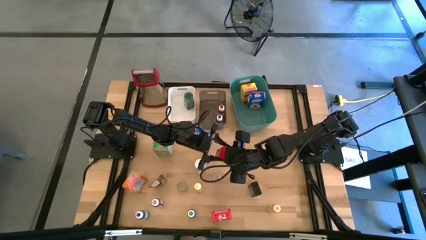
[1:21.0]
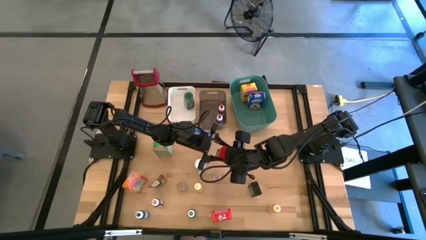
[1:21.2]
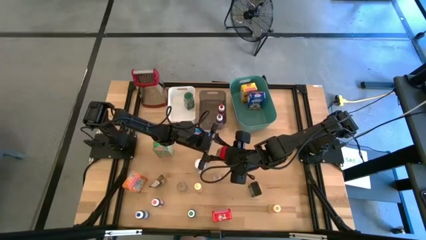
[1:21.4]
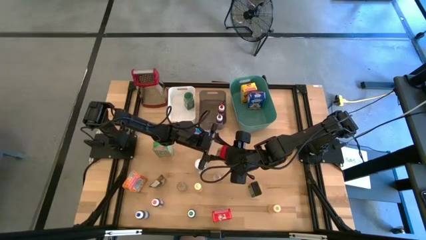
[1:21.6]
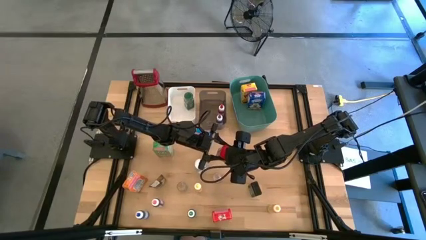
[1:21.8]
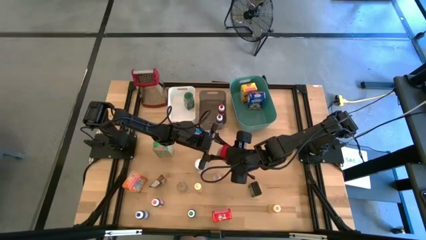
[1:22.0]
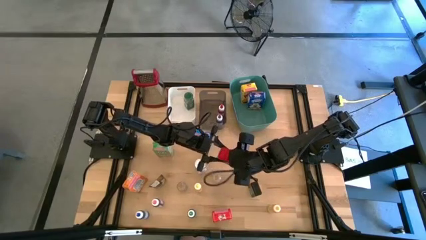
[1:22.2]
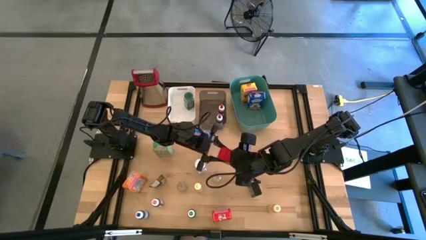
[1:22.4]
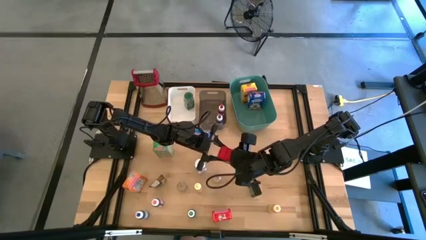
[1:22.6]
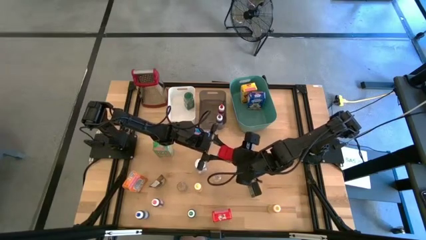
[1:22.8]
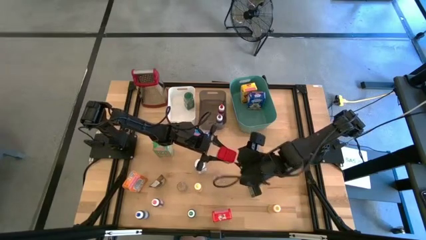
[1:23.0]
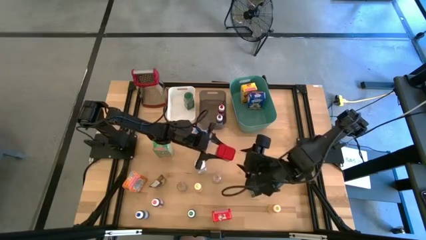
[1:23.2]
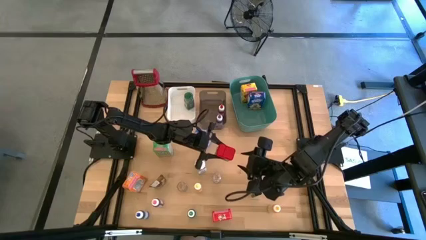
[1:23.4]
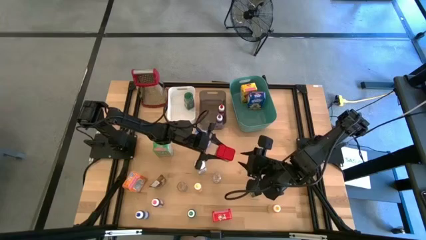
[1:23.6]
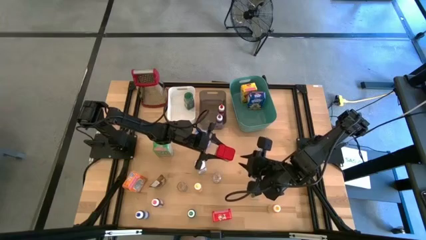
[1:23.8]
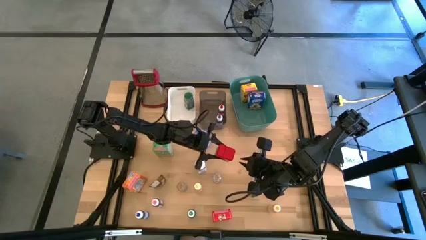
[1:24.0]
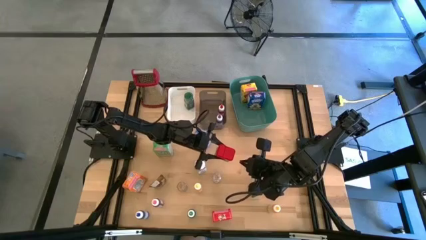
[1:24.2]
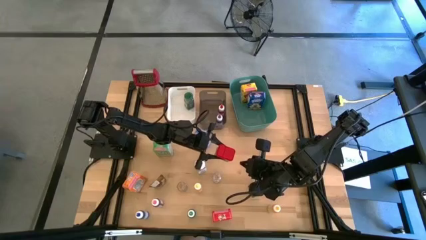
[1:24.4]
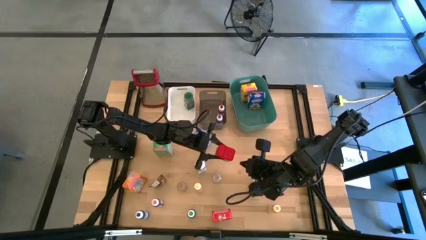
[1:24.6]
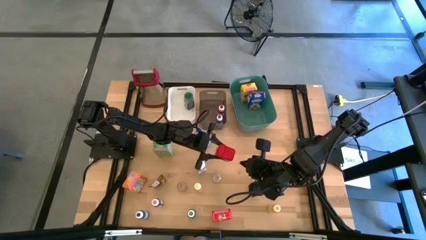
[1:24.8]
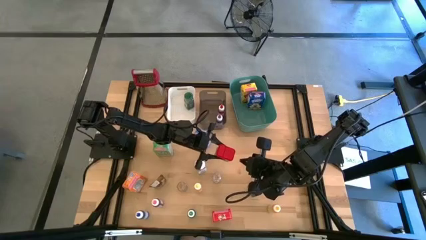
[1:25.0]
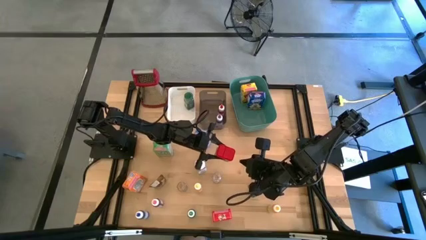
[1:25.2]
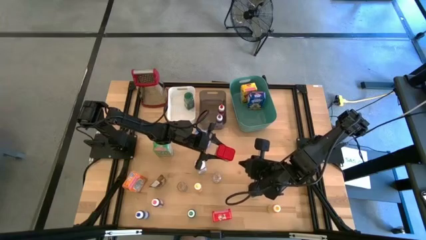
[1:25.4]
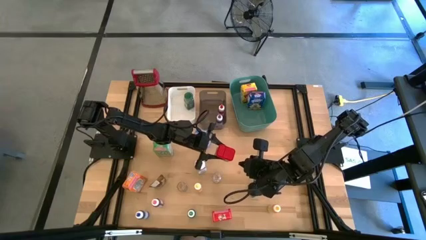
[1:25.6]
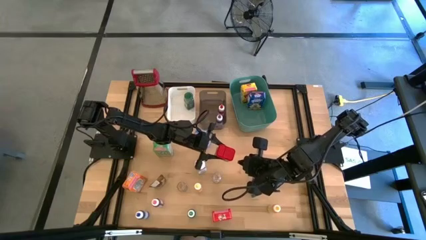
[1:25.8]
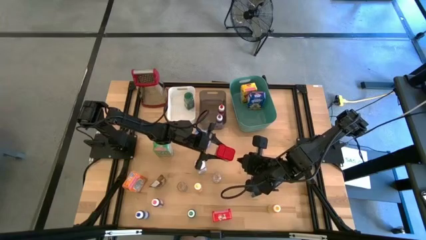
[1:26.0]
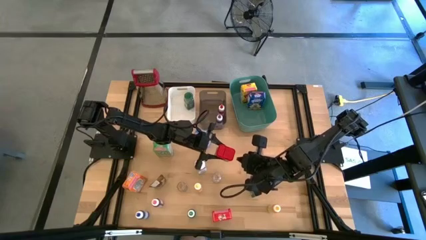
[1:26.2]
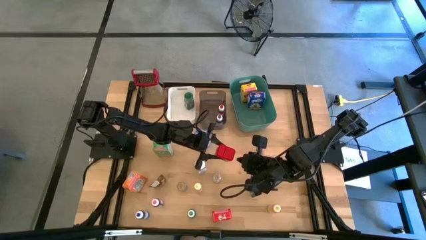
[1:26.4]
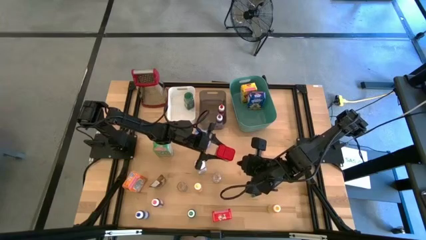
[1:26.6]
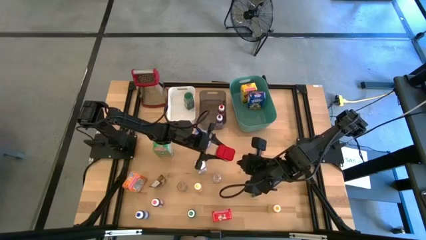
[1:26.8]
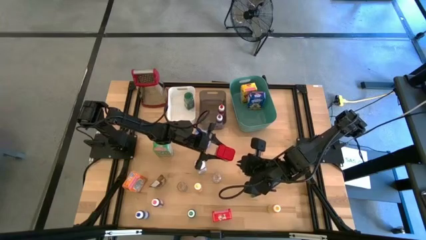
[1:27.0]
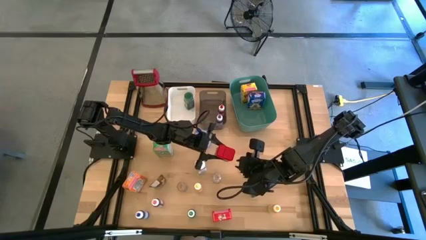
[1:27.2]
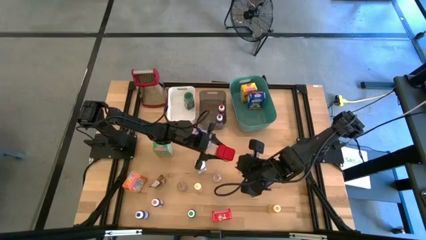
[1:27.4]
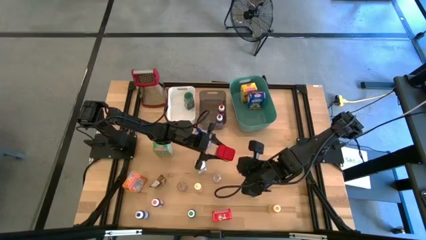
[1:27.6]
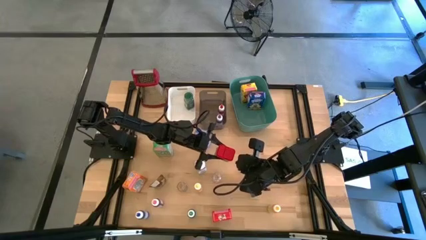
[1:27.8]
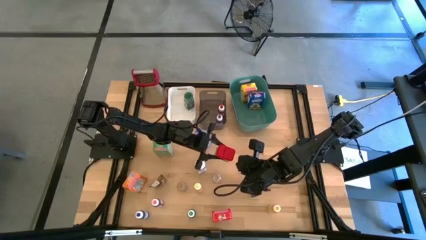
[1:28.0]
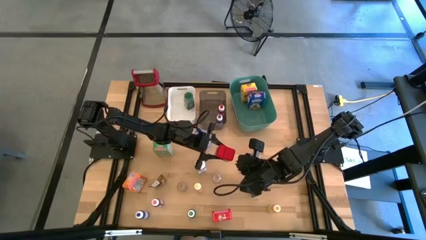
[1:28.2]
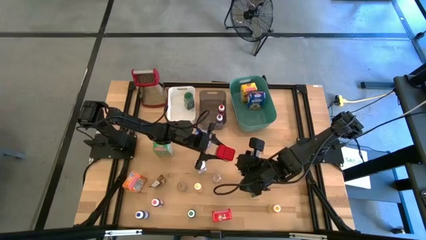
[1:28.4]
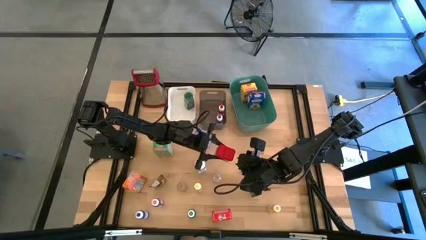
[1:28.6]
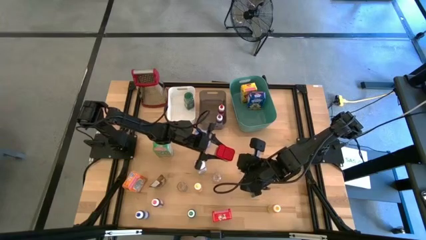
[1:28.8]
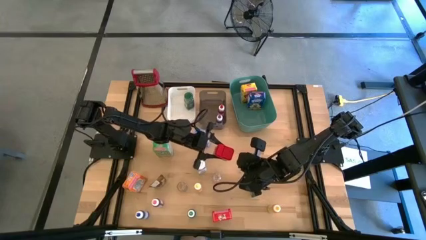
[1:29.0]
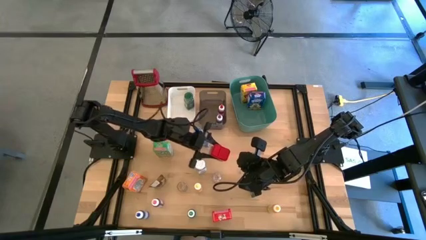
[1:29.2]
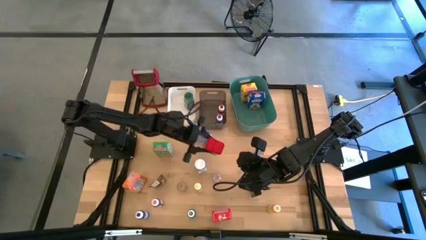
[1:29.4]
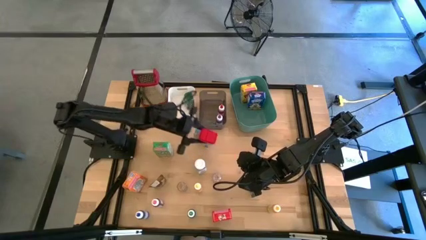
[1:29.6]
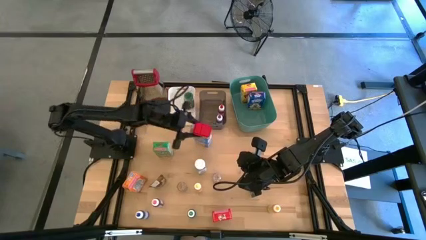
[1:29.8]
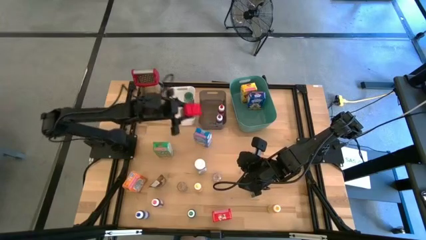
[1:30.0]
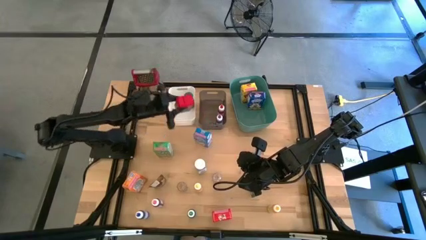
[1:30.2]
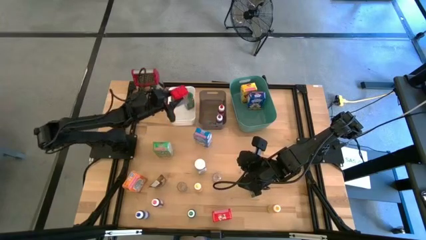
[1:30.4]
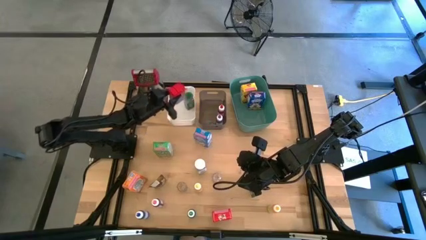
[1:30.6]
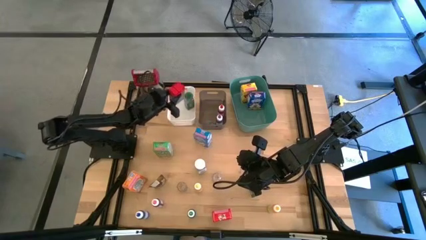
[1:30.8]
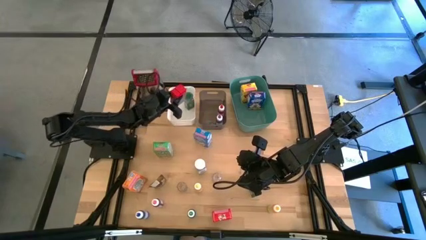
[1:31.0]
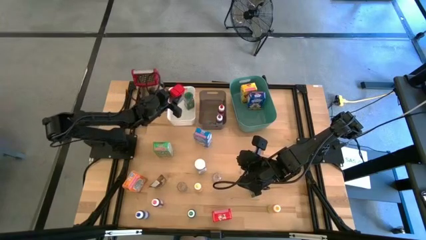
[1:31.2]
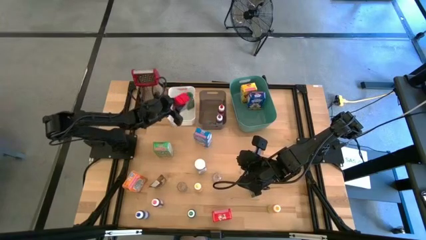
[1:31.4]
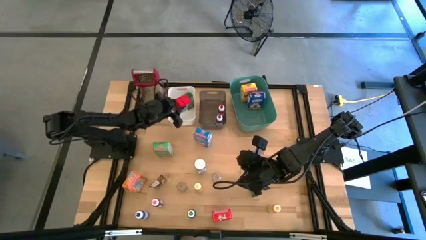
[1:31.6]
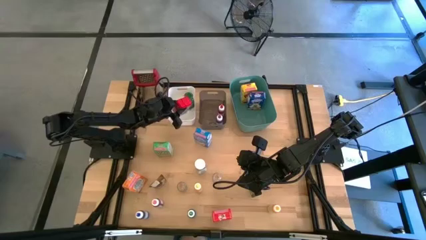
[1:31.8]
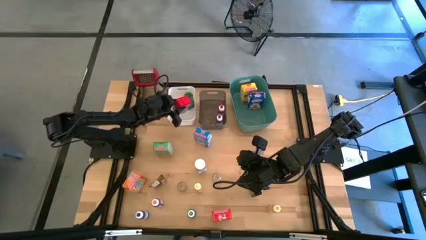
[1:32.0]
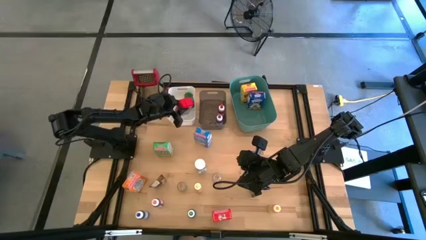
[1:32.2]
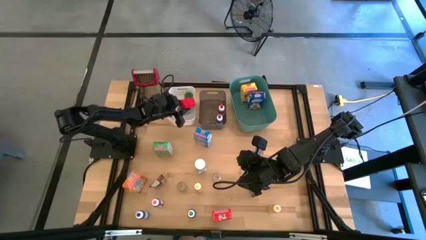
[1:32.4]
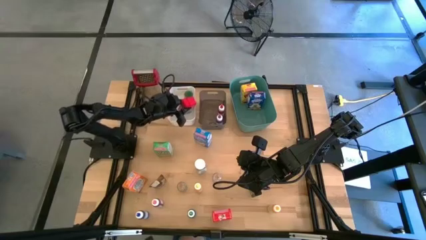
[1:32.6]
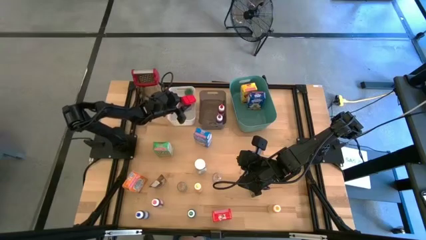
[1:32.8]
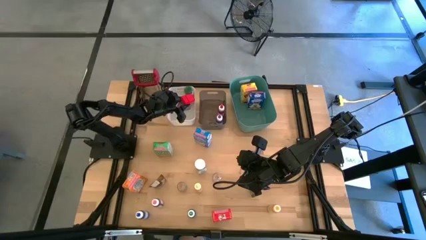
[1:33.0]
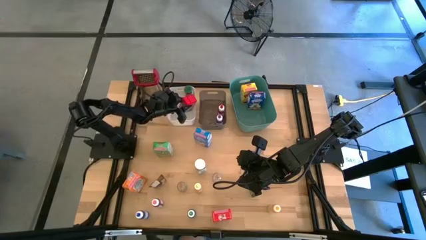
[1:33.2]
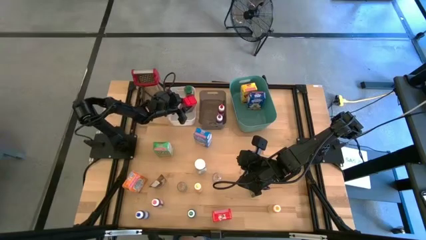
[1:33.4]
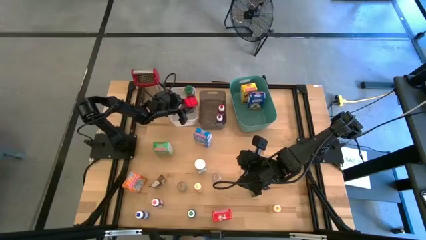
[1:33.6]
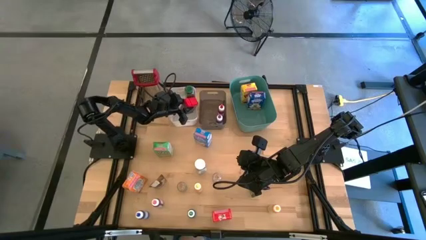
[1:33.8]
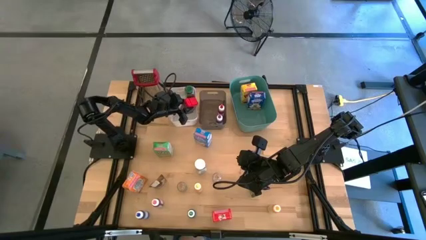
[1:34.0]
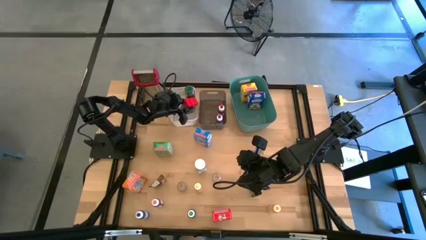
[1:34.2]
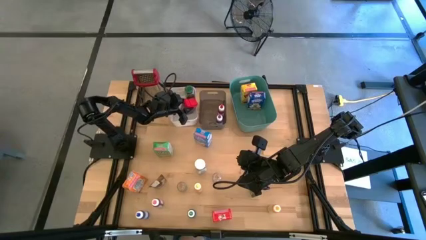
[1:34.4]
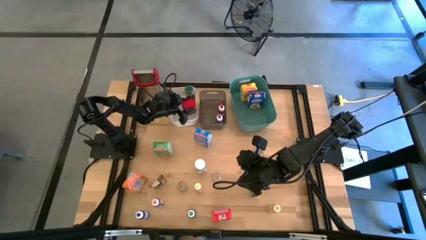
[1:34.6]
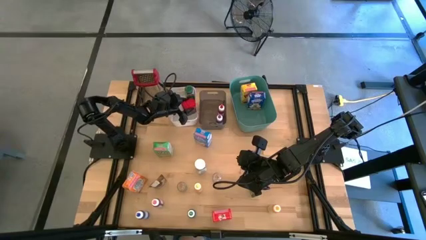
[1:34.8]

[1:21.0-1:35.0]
Task: Pick & Place Kitchen Items
Put the red spice can into the left white bin

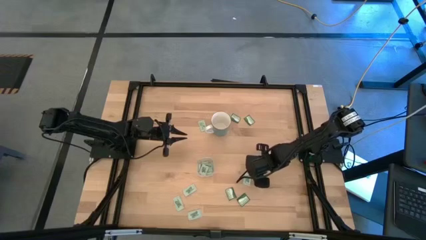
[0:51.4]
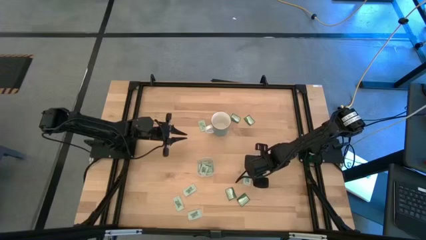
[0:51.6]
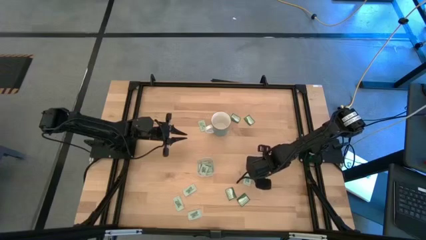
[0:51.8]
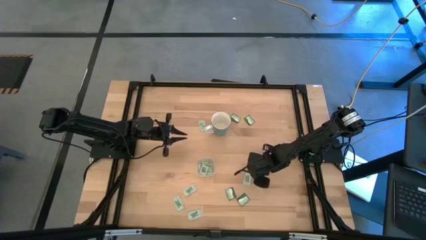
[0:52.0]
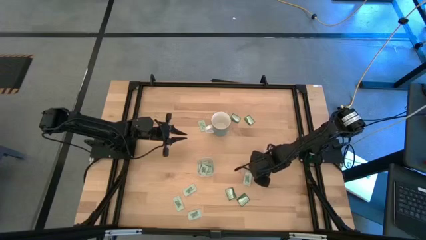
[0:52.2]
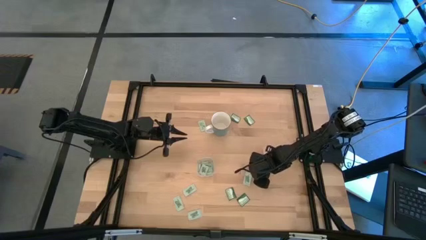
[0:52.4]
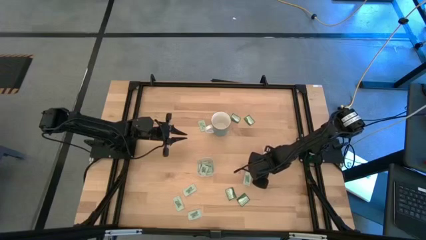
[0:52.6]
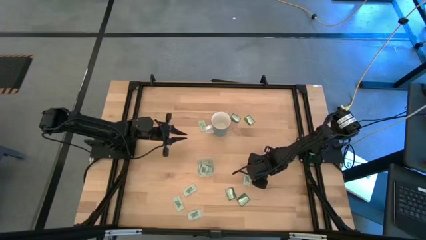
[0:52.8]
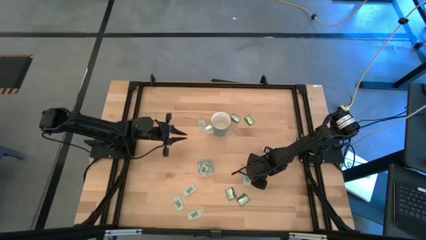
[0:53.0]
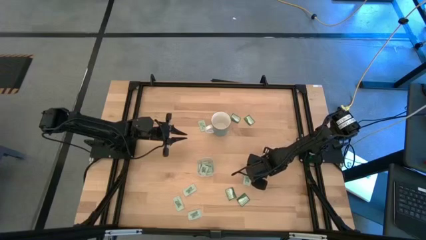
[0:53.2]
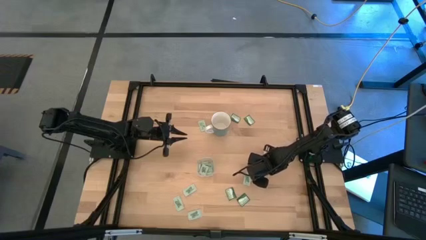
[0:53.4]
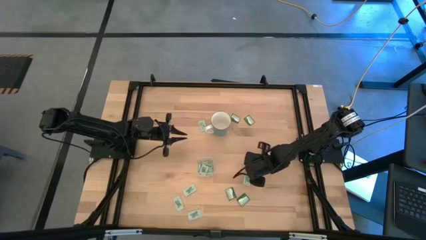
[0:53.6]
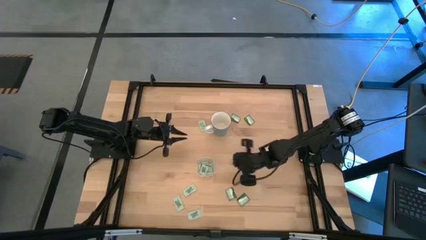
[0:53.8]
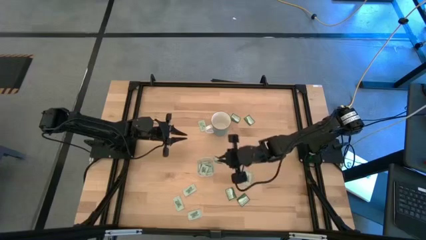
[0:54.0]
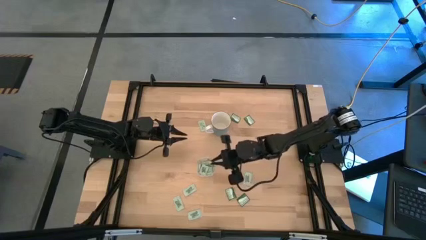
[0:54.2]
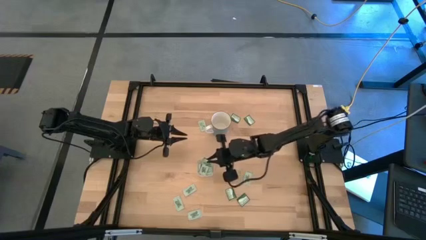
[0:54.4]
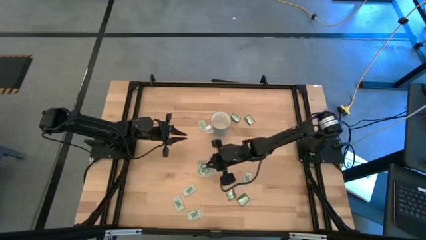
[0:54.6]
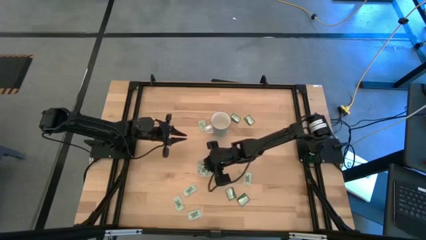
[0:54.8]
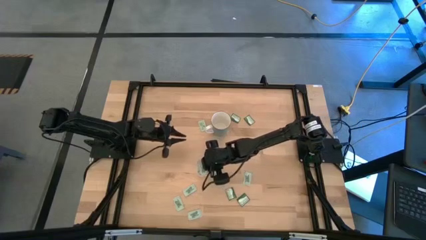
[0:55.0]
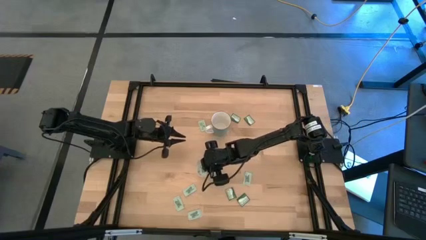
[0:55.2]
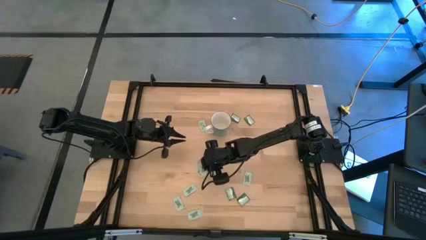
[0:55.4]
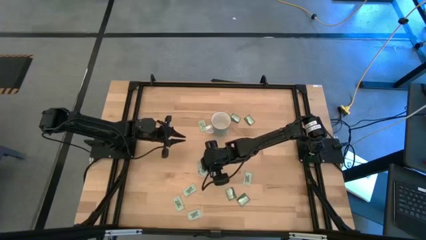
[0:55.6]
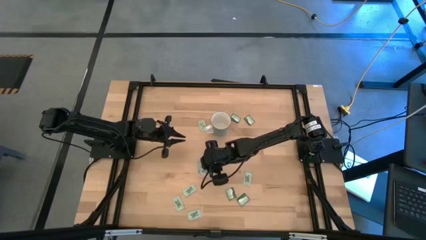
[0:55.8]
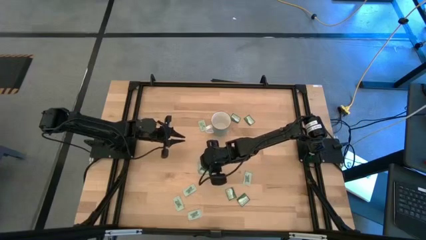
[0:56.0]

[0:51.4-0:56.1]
Task: Pick and place Stevia / Truvia into bins
Put the green stevia packet into the transparent bin
